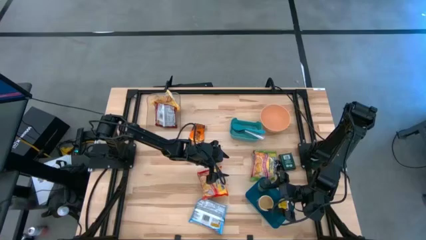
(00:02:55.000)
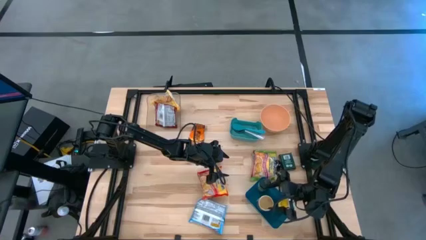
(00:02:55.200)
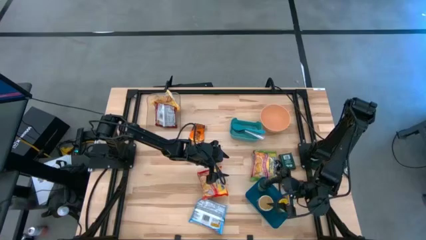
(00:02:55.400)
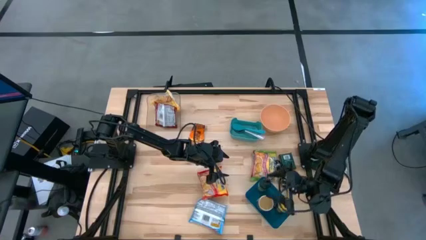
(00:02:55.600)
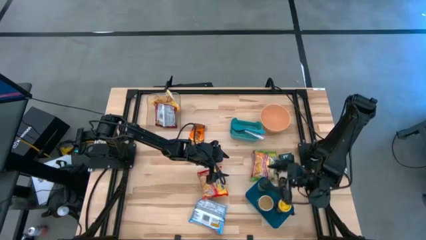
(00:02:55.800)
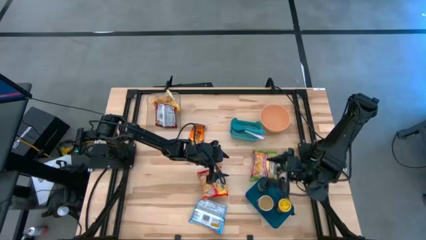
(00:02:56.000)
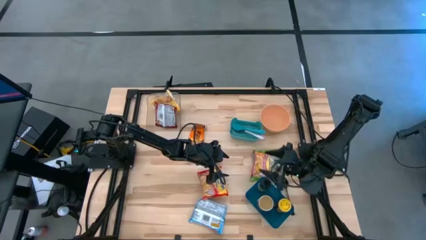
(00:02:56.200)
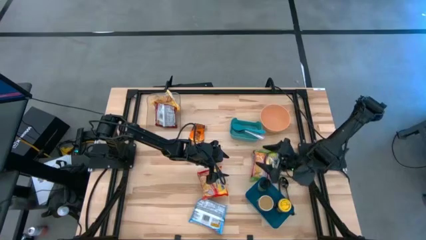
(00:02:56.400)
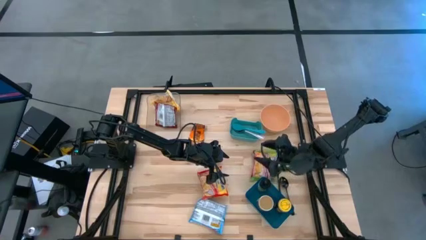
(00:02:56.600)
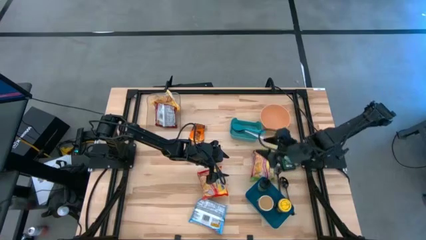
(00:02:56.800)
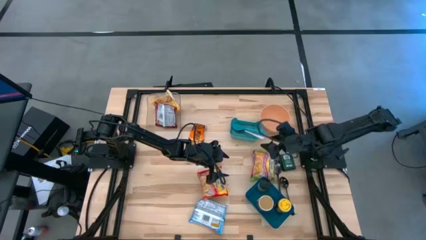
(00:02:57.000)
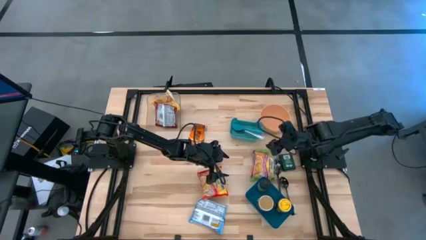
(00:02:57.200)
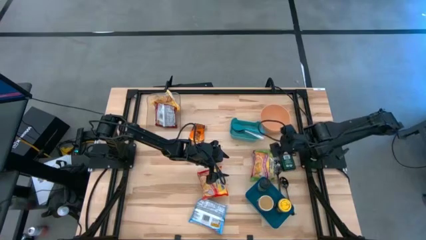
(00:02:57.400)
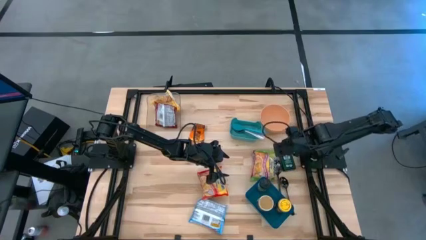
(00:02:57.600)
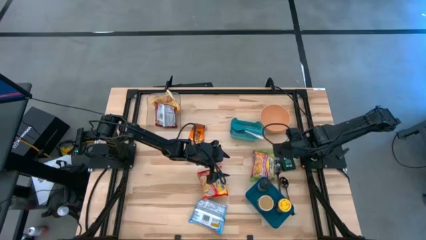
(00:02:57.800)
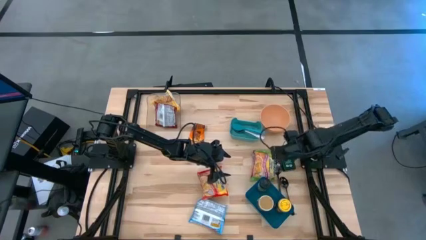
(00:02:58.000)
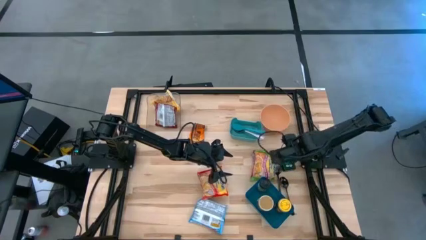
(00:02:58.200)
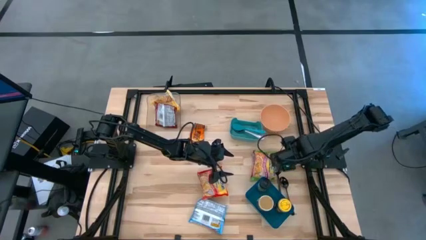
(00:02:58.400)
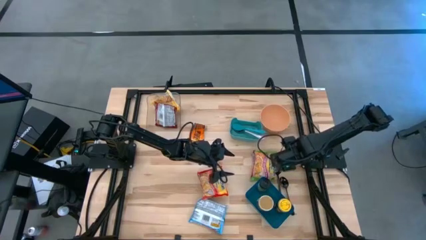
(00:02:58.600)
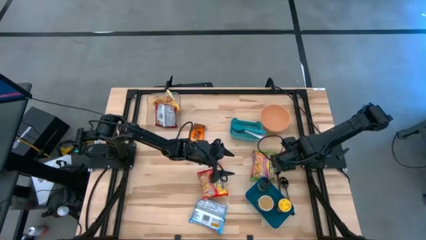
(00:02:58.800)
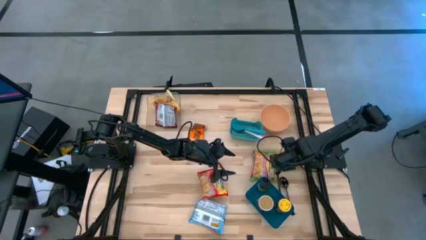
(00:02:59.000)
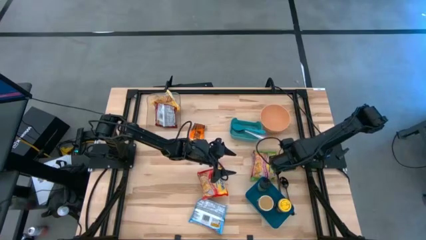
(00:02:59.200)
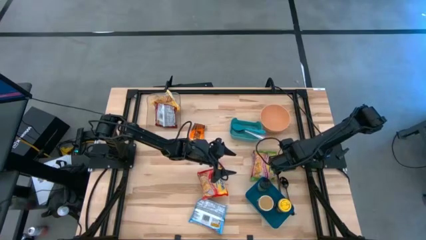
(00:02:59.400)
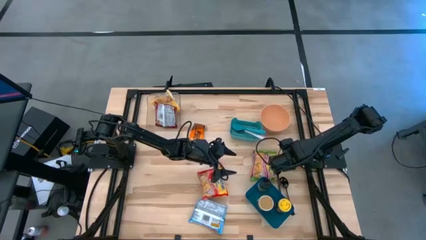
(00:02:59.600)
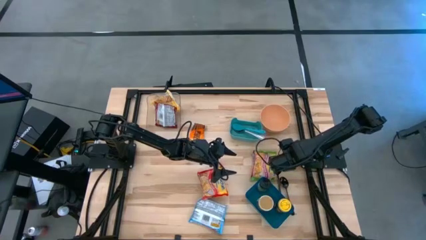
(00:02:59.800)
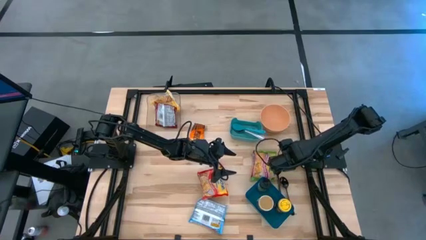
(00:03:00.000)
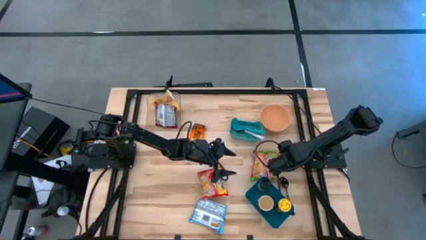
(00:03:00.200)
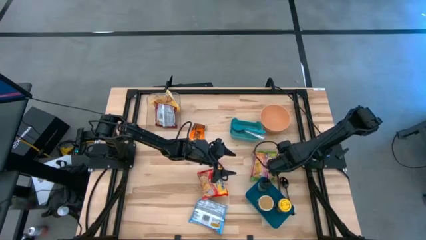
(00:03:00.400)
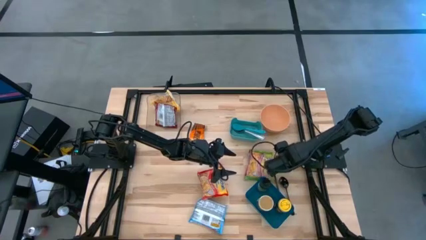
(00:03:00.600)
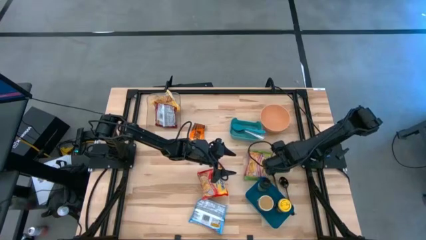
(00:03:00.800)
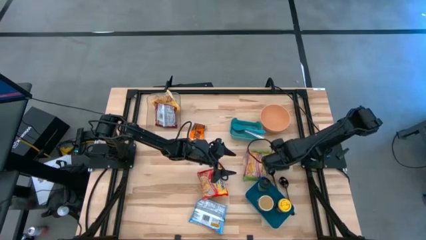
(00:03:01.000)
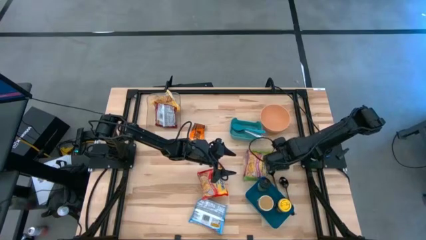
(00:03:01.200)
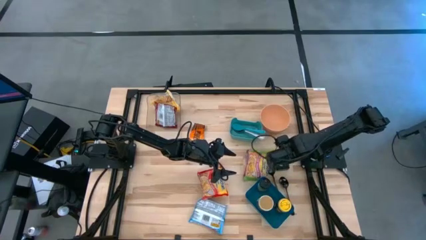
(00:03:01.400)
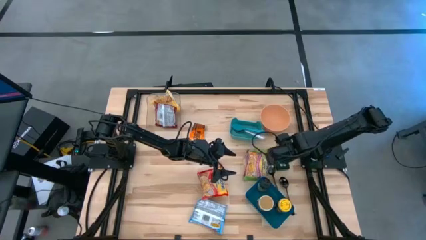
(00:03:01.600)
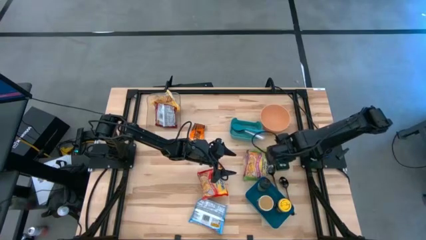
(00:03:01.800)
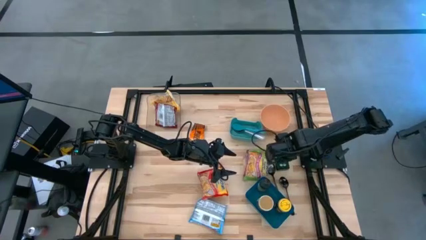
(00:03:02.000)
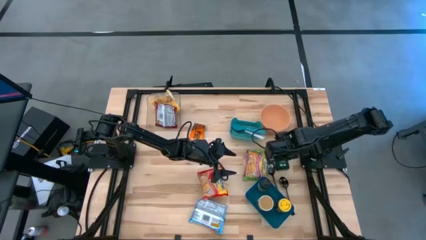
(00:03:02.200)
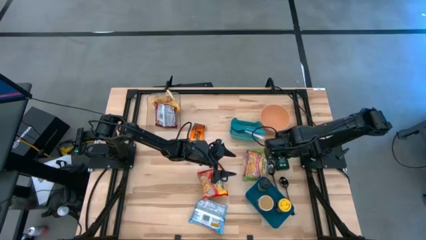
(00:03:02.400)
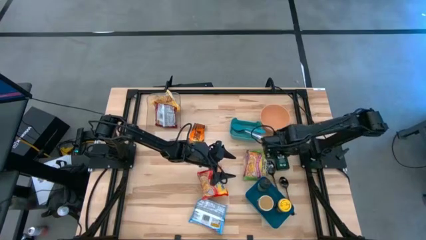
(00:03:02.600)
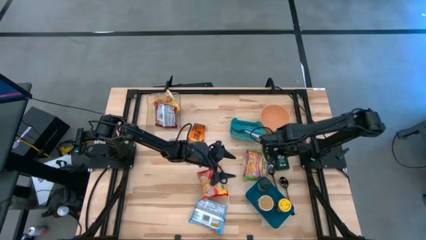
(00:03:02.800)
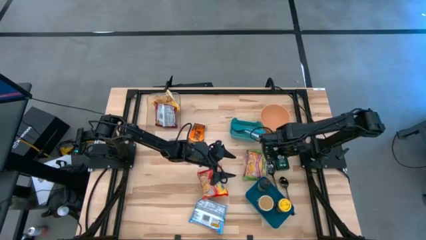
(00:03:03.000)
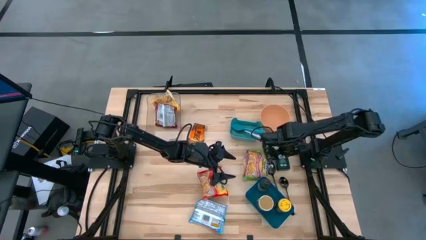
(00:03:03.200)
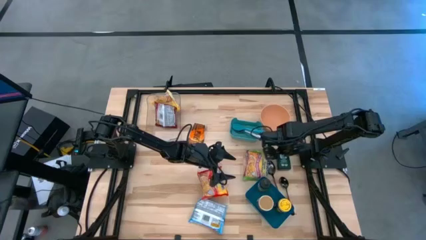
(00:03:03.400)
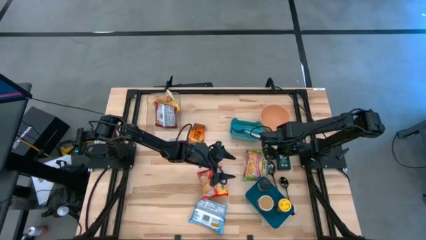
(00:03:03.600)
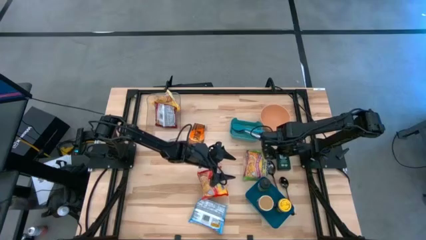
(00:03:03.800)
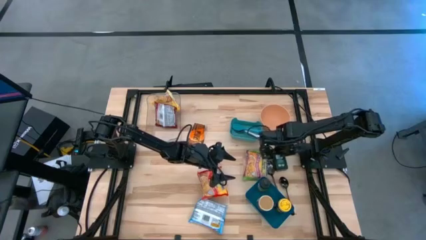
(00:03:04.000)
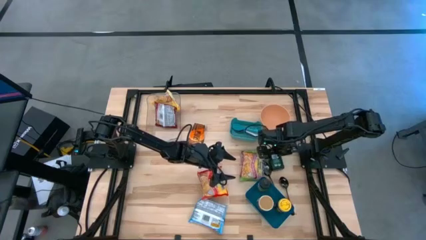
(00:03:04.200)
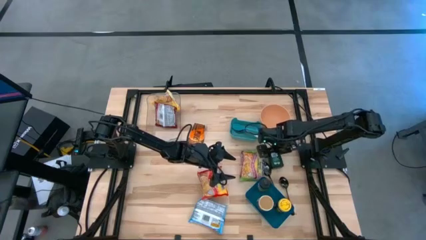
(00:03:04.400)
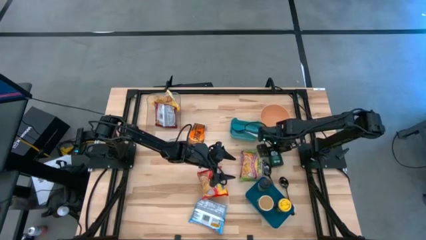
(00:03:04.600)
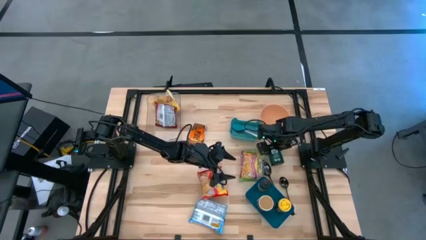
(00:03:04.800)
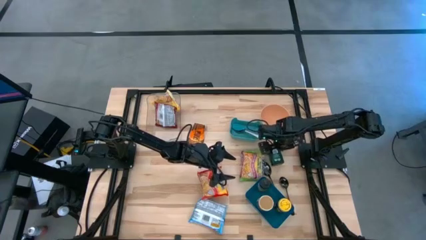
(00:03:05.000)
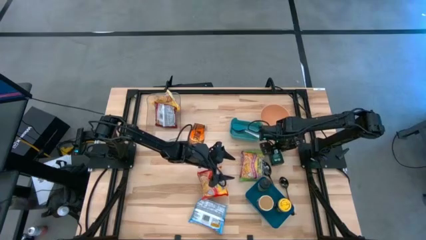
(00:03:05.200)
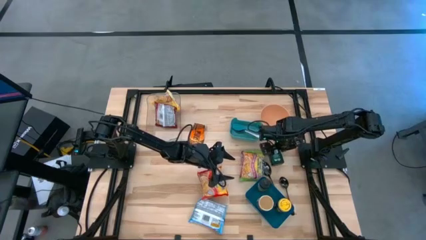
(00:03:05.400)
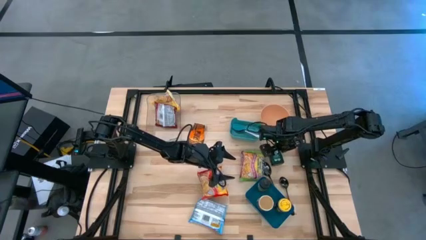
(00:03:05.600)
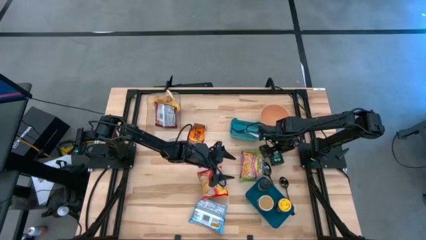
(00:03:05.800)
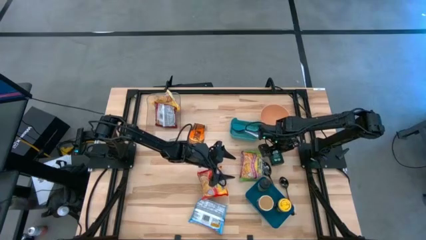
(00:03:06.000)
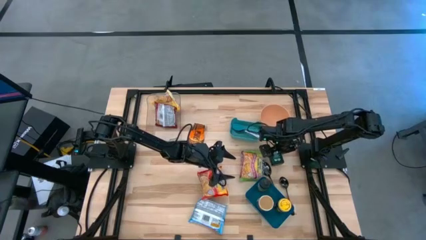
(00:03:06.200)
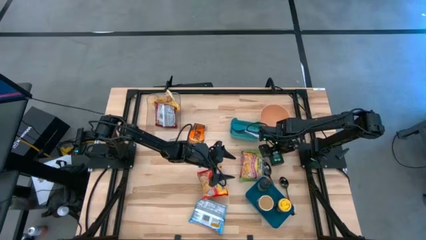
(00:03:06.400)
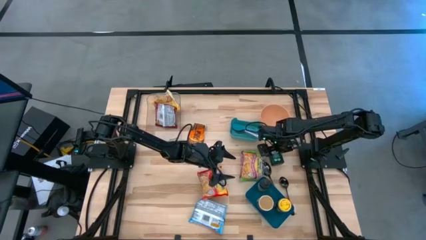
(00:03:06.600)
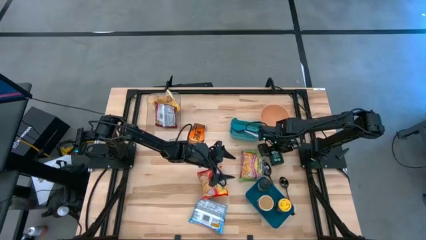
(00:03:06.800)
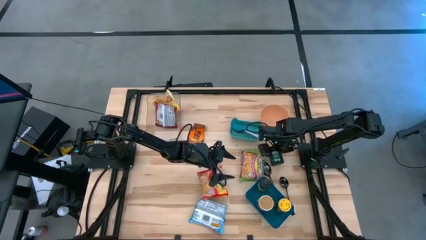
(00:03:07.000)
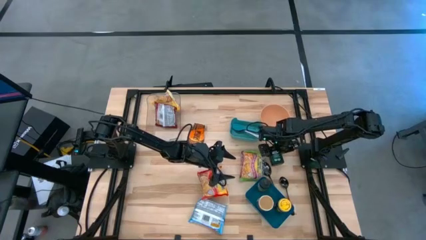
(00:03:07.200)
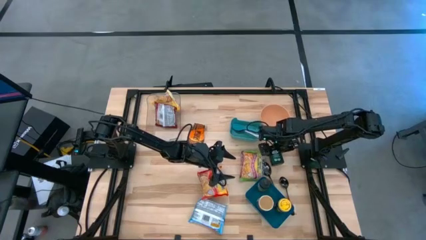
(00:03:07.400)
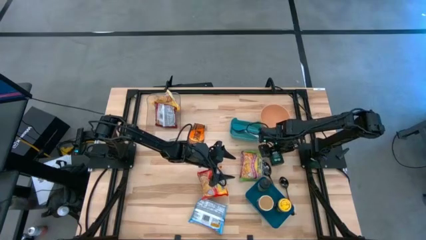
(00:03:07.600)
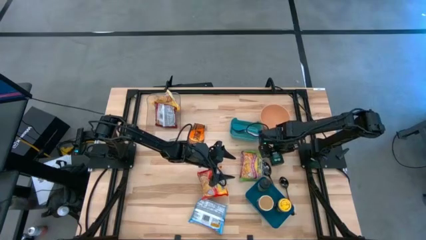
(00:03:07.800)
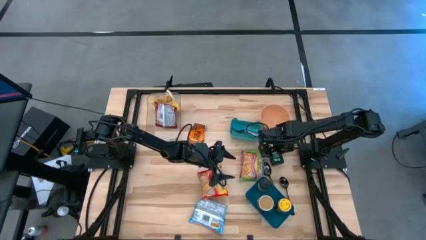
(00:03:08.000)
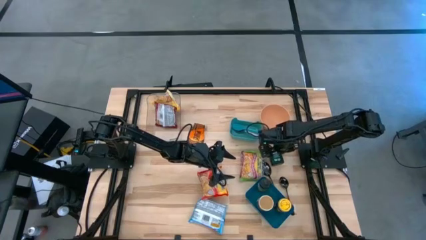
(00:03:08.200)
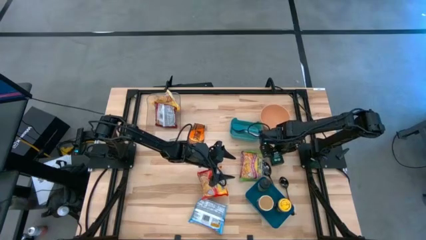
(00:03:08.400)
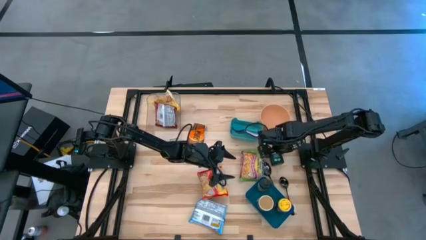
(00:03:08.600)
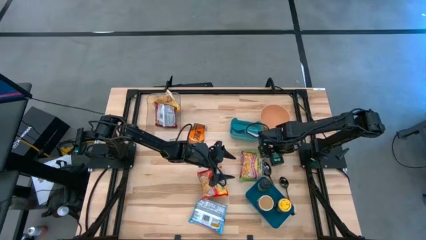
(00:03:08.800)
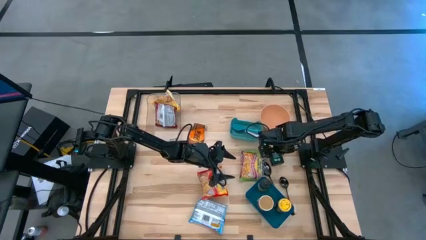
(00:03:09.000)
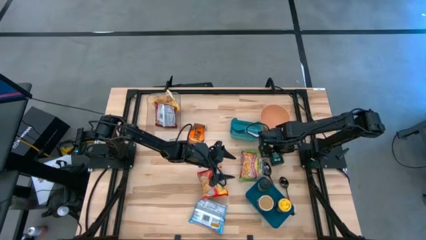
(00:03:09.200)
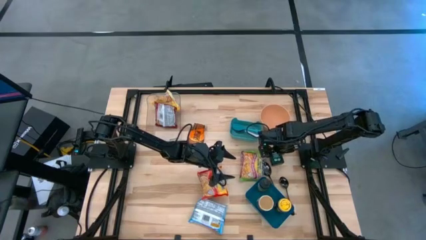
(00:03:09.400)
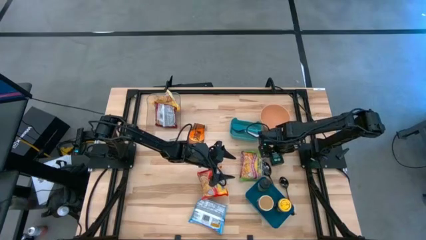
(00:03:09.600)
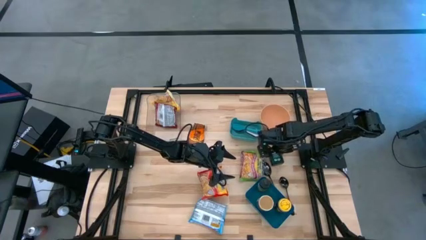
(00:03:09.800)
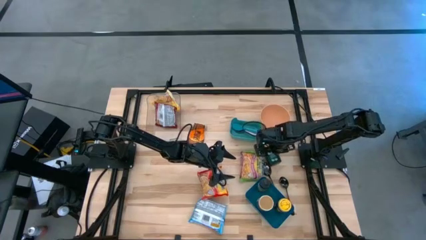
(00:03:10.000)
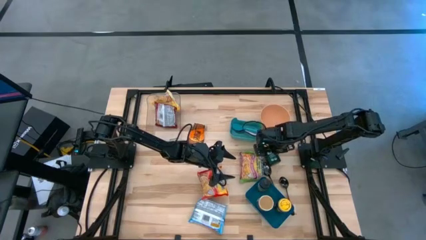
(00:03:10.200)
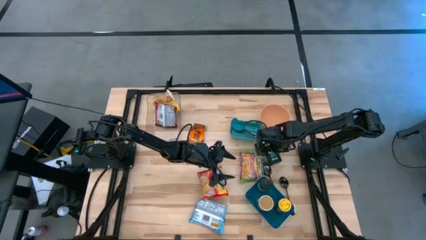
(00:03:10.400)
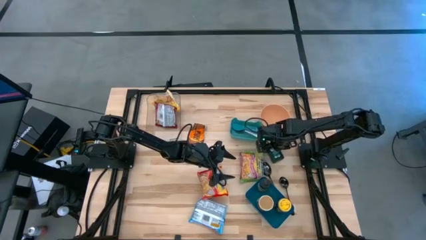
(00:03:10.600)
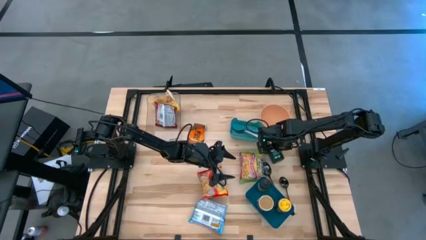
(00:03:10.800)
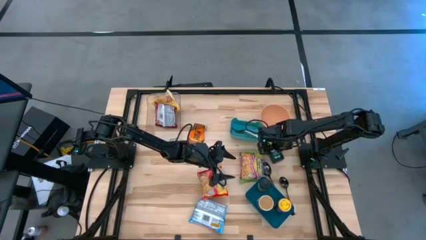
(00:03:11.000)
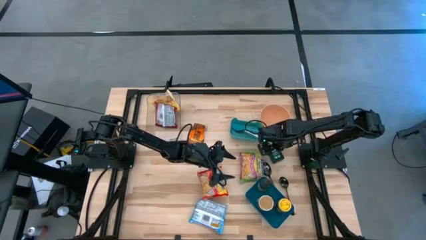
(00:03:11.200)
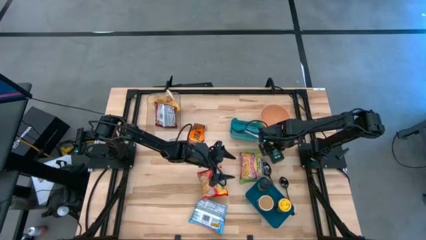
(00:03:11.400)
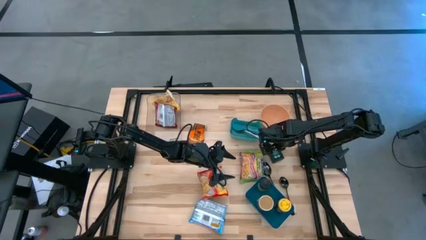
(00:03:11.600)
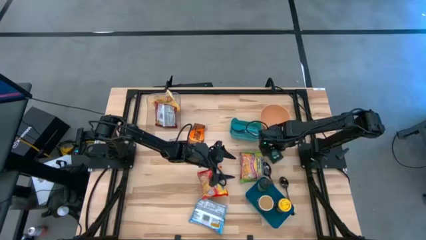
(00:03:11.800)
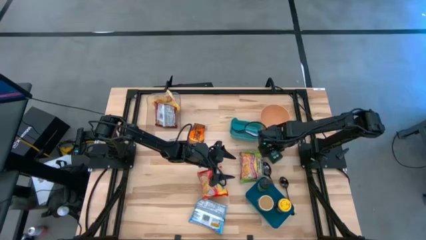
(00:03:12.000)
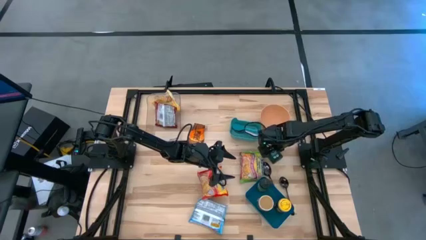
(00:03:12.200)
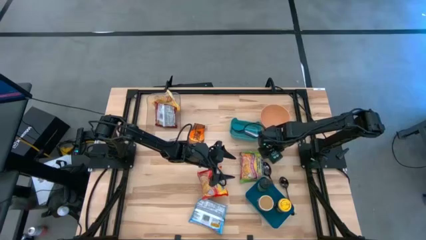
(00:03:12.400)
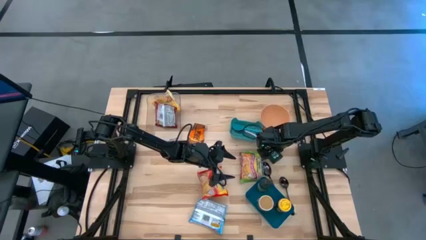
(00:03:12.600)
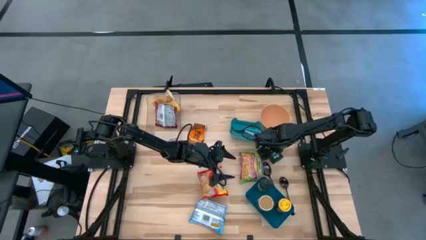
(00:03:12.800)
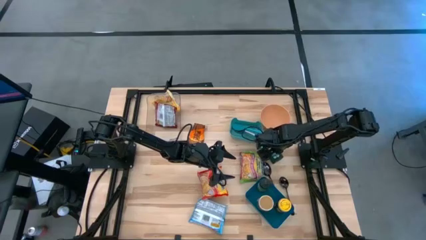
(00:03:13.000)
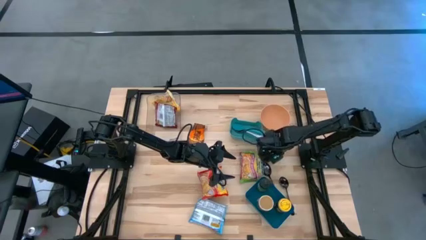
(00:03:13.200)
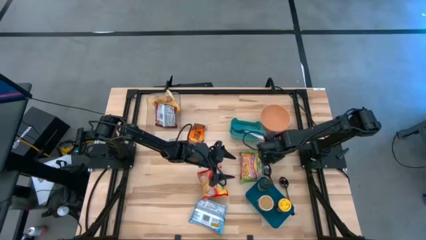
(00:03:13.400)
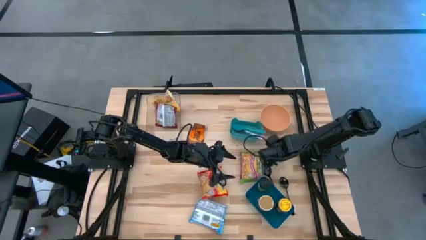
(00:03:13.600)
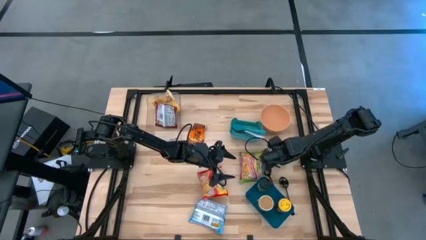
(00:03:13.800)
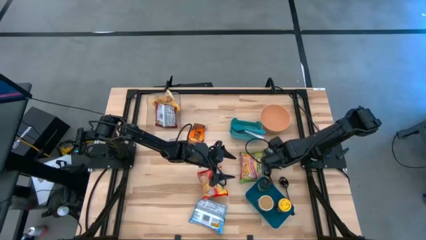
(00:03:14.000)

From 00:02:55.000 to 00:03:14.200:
Task: Pick & Place Food Item
Put the green seasoning can into the blue bin
